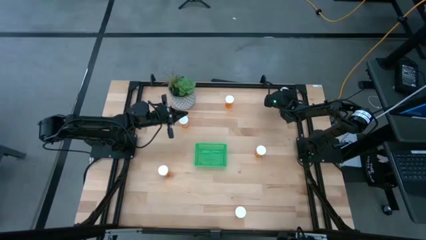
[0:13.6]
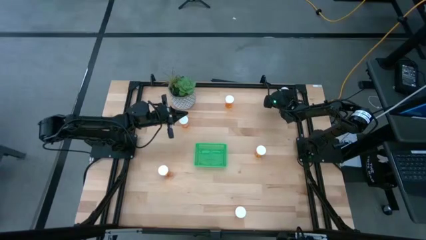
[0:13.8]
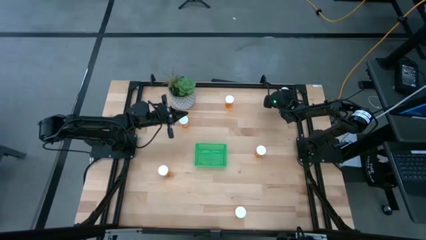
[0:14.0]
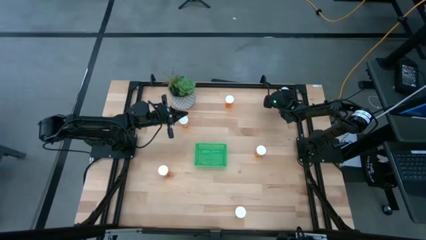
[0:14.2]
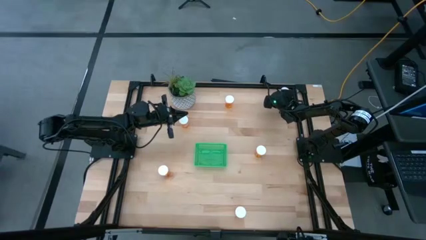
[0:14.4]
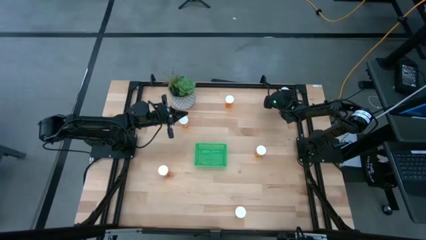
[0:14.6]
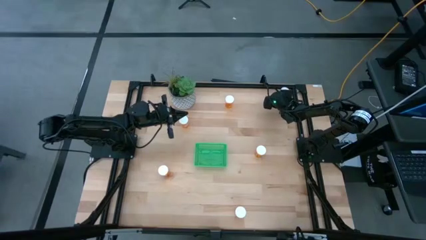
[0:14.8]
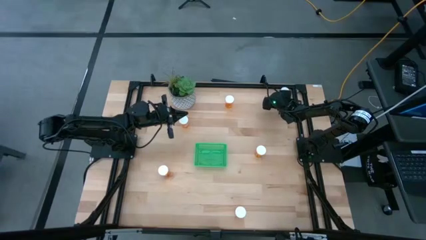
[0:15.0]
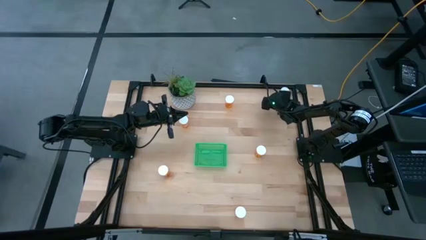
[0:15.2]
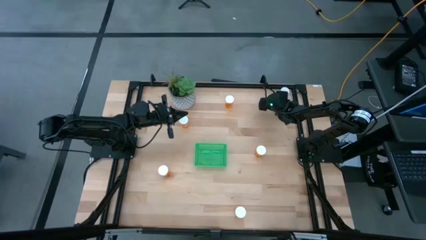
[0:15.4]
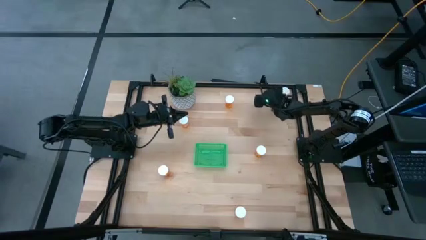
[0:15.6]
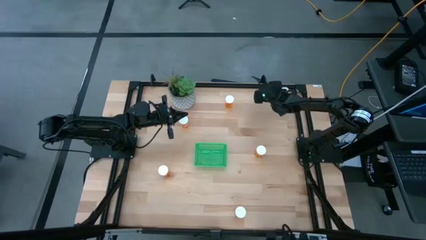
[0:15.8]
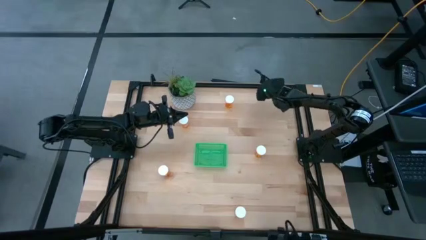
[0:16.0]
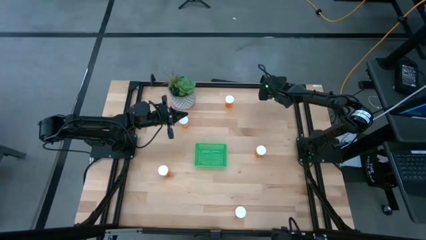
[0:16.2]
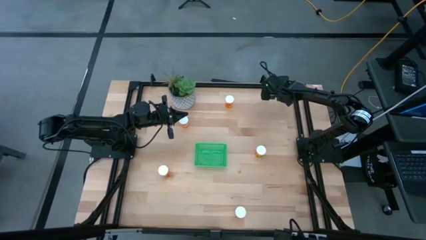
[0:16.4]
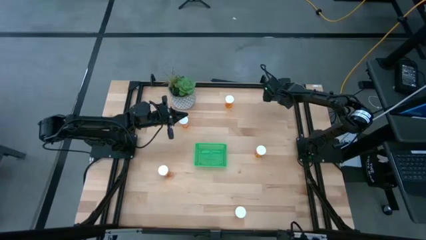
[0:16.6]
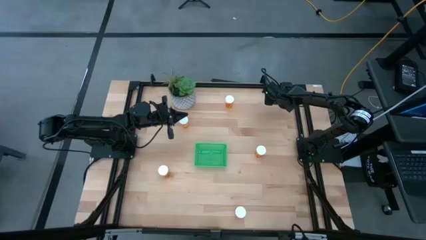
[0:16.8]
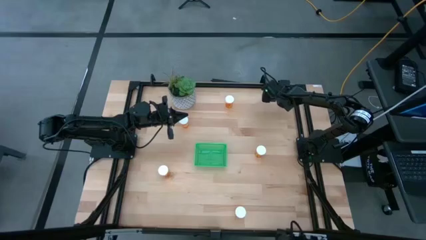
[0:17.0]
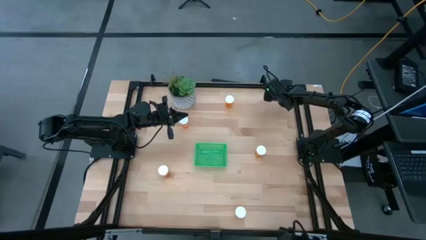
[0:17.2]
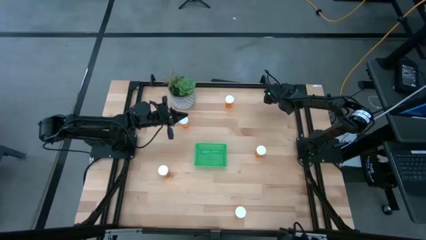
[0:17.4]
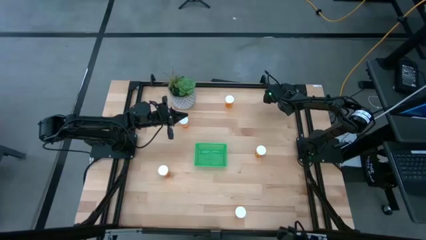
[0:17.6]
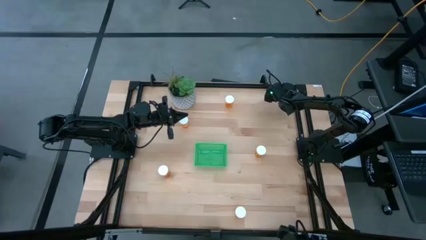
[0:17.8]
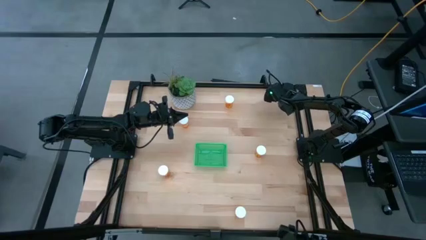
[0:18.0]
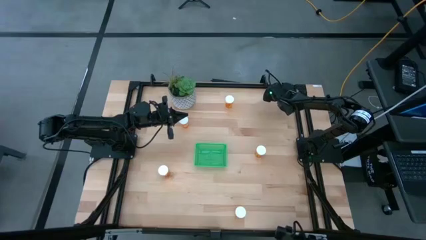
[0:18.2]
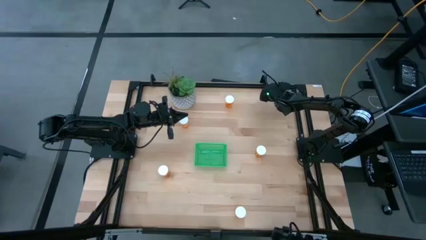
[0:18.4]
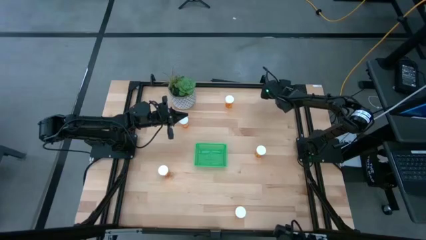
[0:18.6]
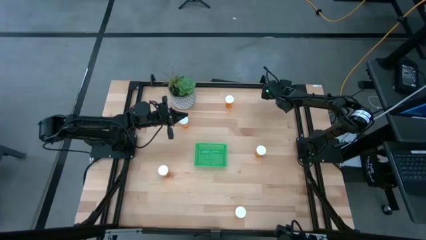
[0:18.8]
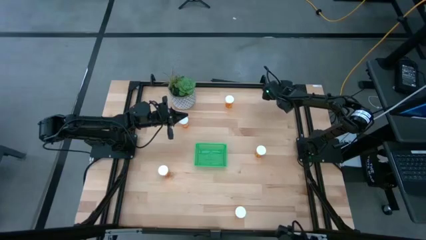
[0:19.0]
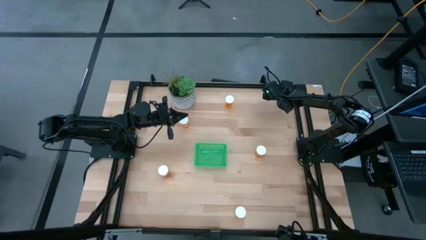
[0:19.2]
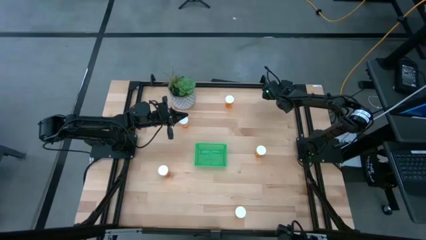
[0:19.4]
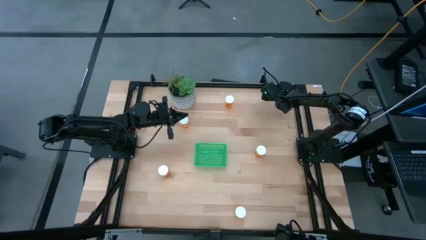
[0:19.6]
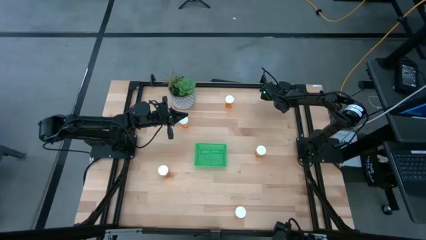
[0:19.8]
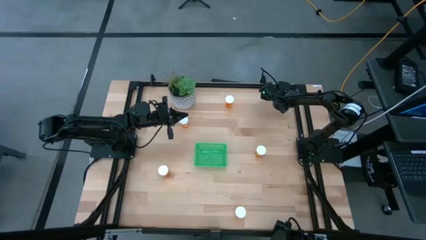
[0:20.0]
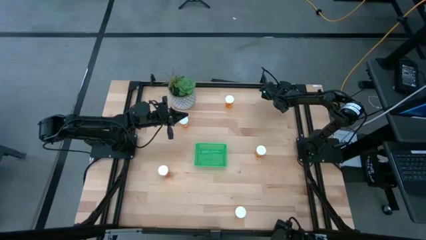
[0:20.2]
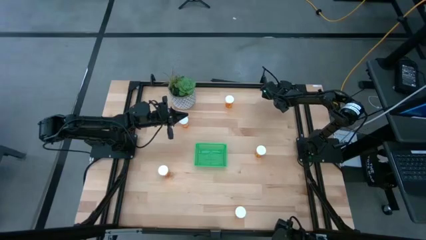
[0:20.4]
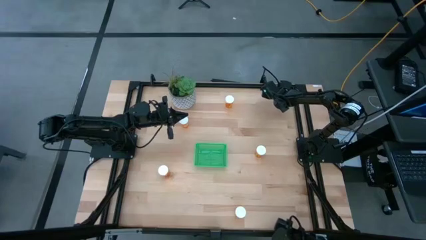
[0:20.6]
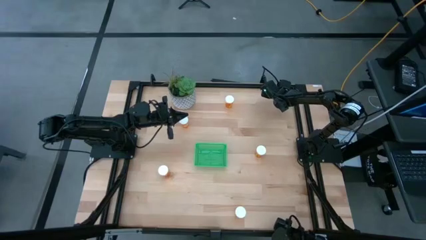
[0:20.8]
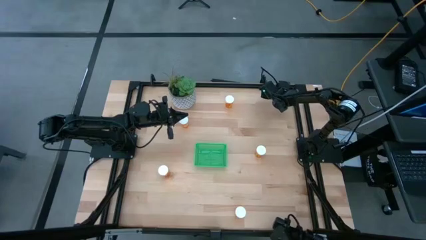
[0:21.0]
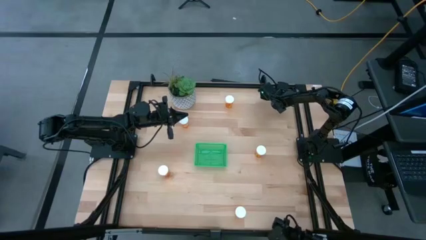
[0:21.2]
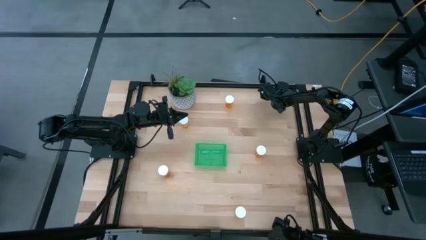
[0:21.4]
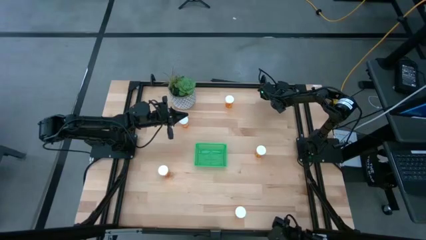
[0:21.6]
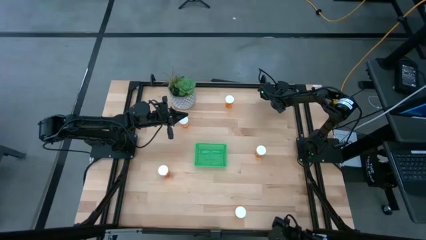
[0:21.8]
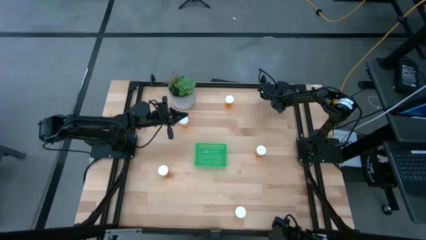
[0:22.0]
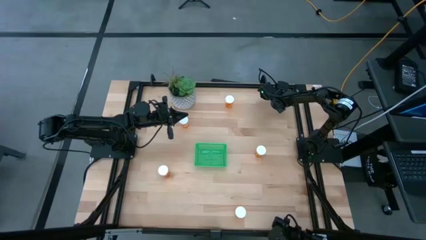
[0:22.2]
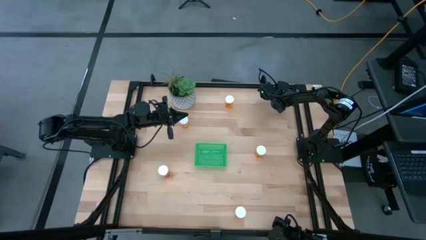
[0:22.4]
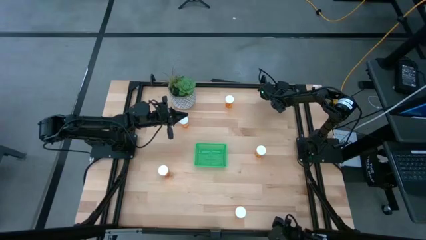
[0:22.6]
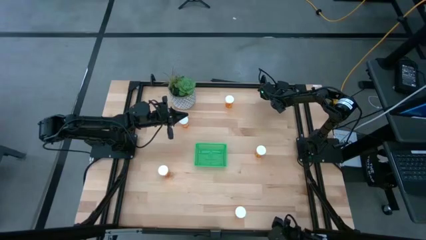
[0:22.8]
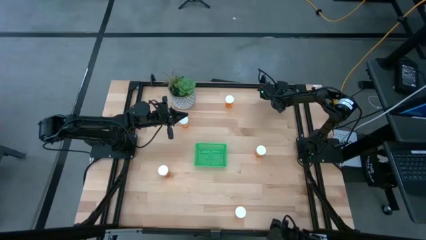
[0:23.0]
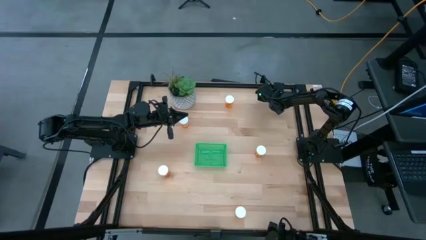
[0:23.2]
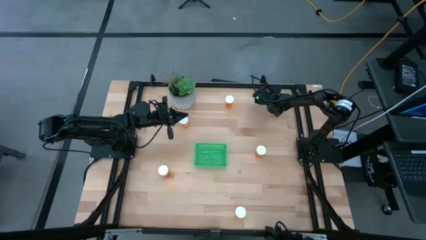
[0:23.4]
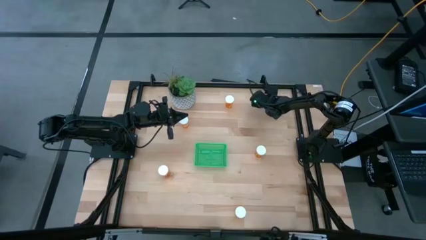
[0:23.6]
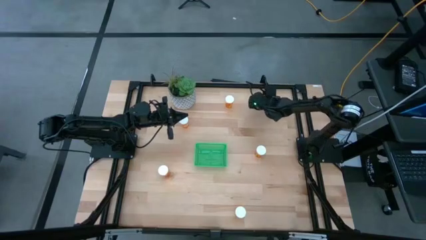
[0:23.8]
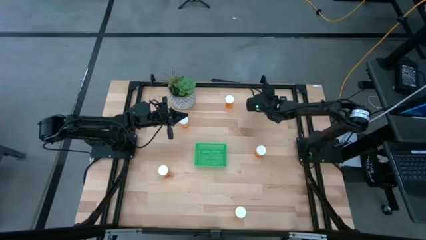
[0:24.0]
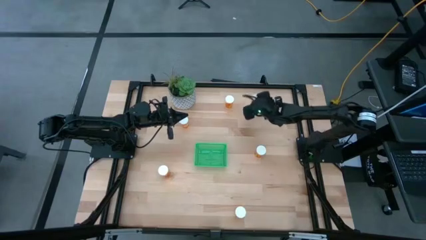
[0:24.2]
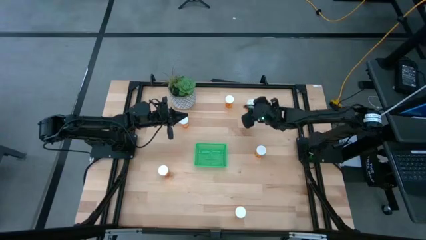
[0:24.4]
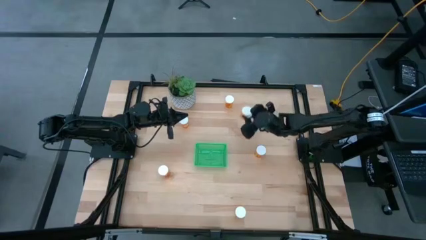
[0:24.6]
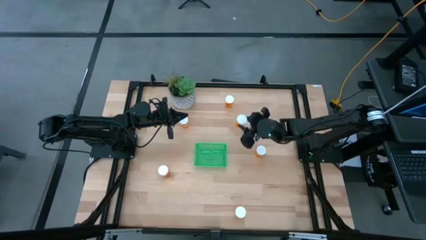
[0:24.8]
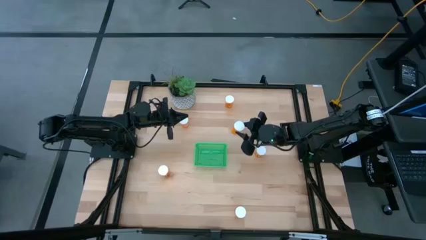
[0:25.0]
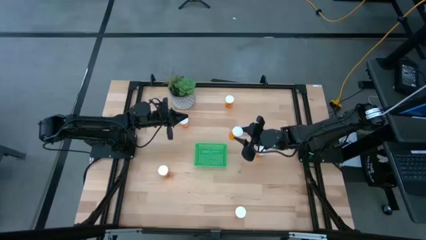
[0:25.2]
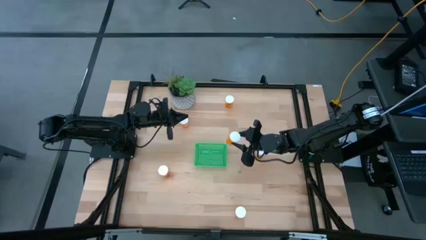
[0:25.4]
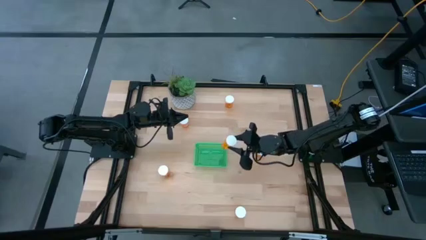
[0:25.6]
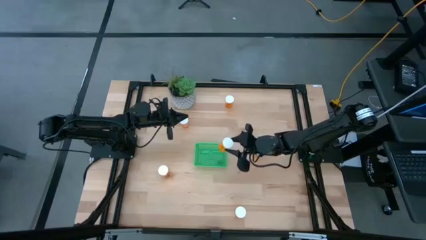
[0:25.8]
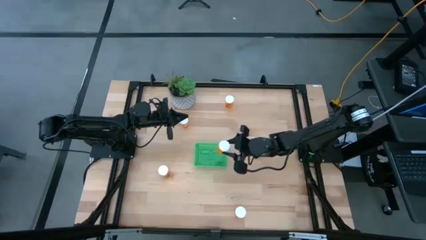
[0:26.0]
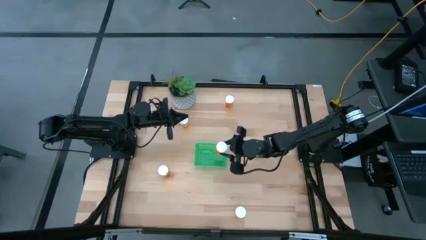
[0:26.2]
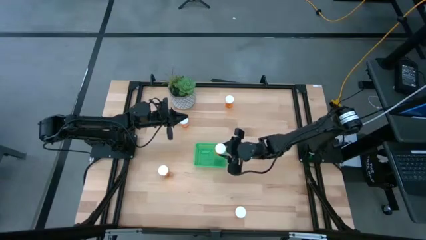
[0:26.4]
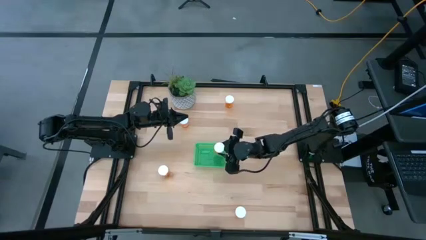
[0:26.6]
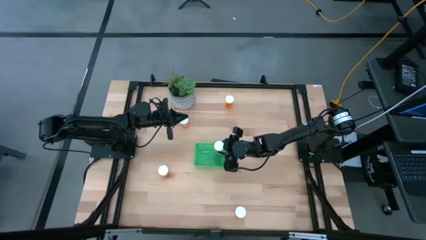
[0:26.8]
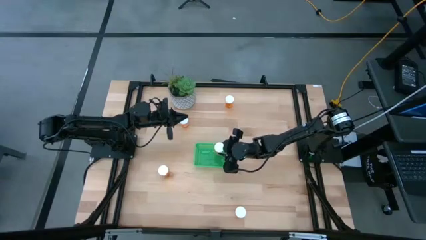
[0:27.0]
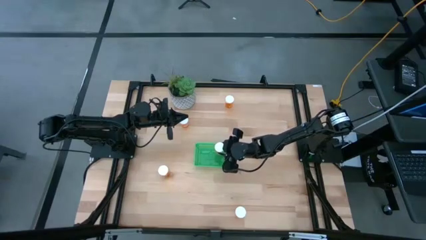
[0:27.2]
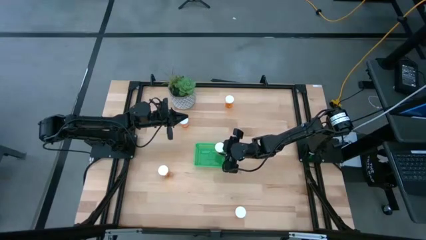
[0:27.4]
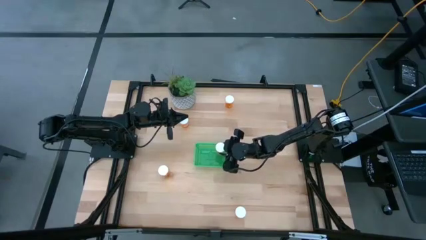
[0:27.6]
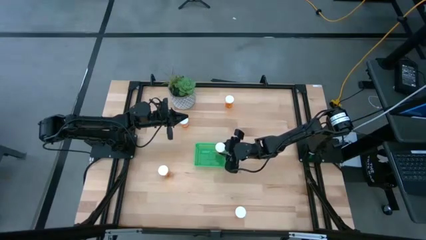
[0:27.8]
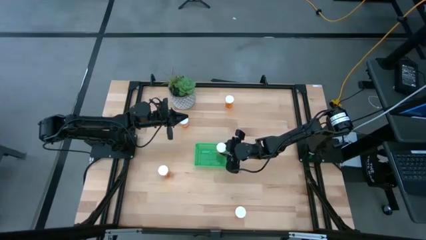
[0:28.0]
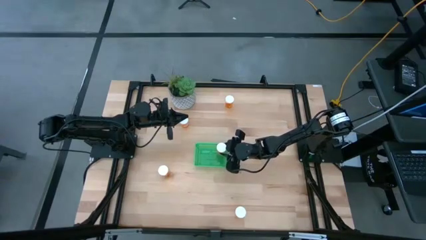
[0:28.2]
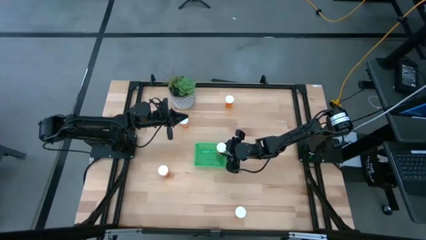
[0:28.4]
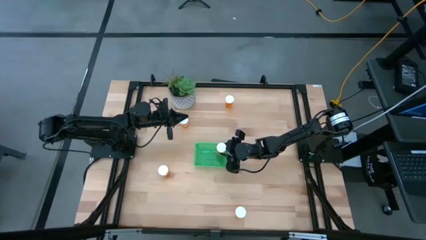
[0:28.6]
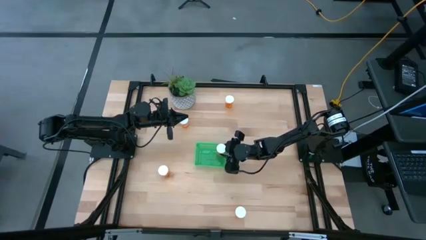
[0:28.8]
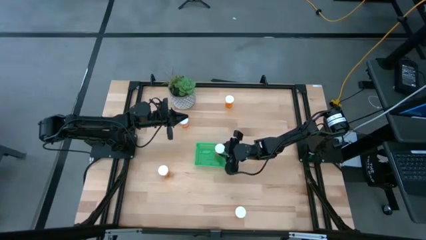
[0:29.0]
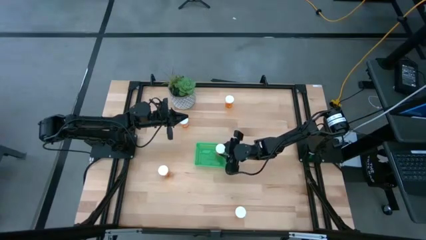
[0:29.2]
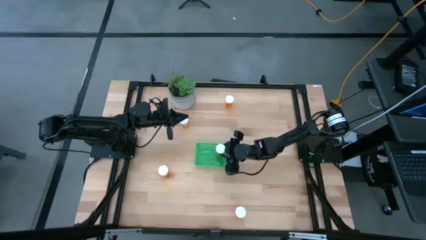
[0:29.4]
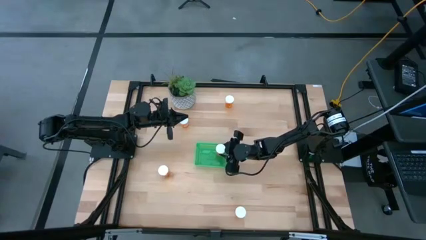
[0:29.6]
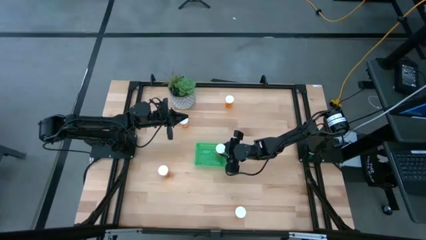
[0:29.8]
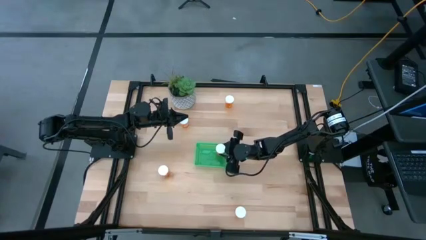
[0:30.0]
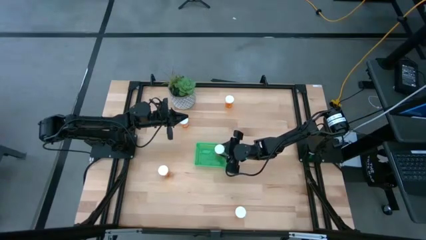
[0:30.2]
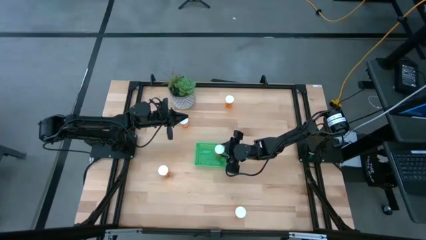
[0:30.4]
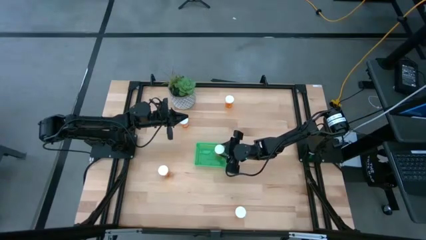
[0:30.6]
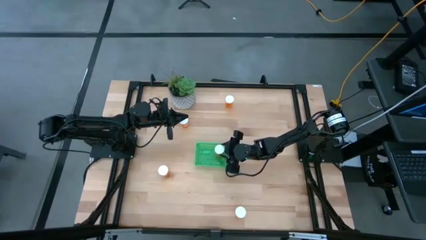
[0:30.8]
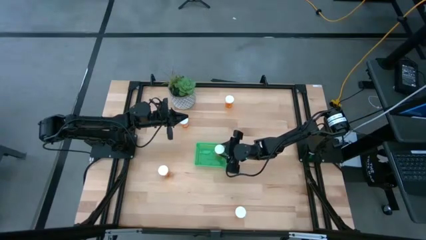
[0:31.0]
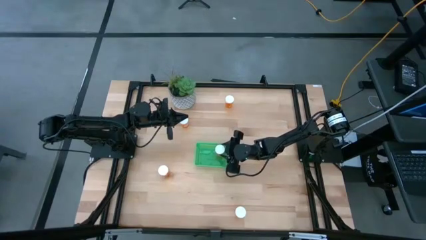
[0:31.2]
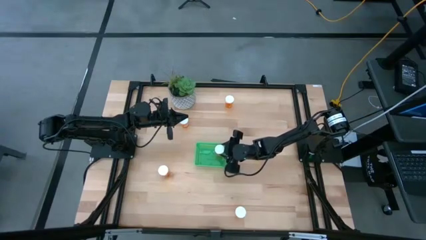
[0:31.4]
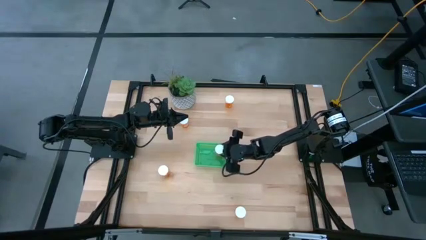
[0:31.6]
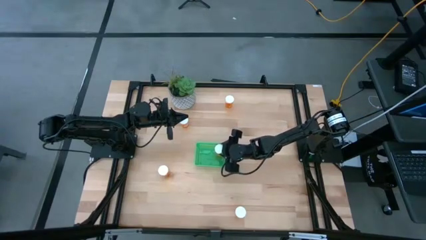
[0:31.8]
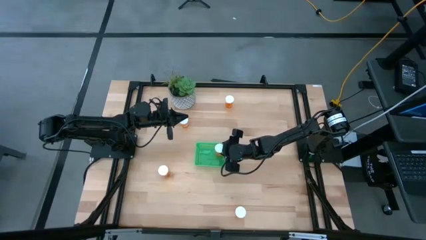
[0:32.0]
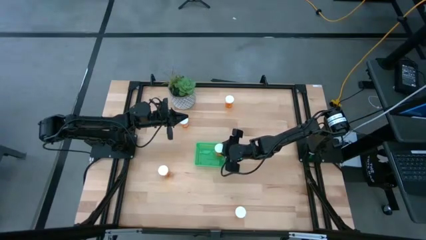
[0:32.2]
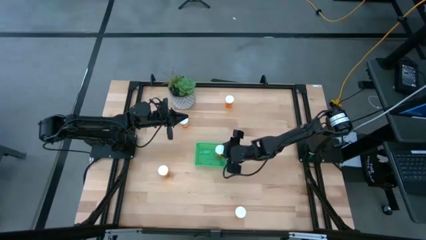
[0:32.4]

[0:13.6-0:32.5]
Task: Pick and place pill bottles into a basket
Put the orange medicine bottle into the green bin
